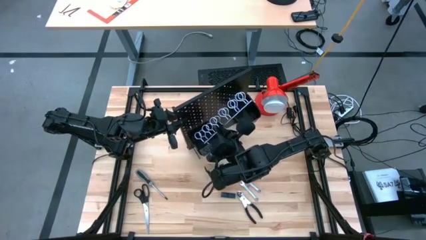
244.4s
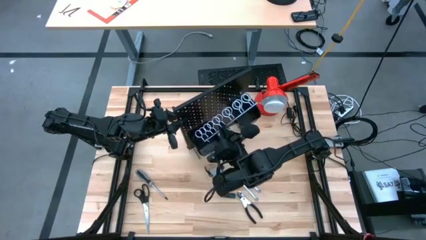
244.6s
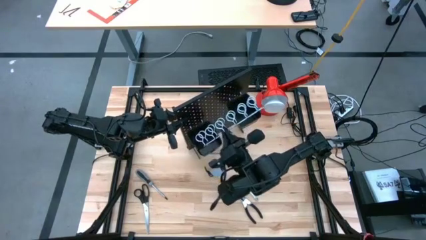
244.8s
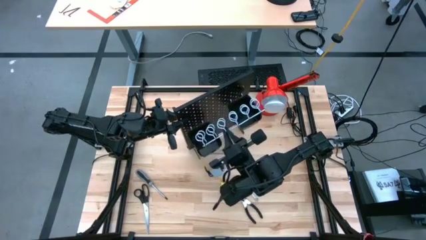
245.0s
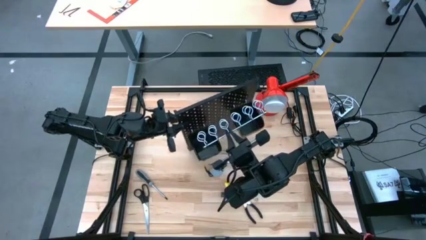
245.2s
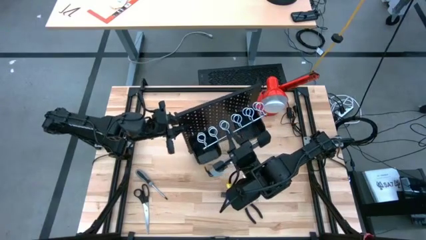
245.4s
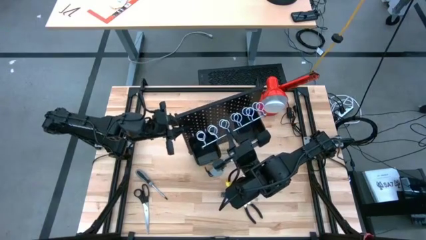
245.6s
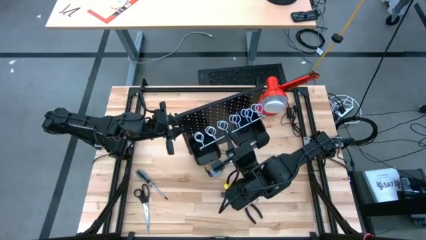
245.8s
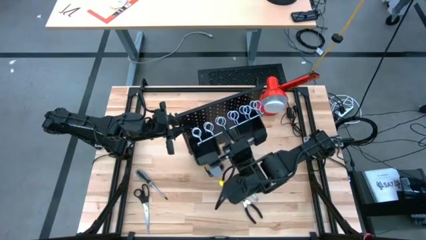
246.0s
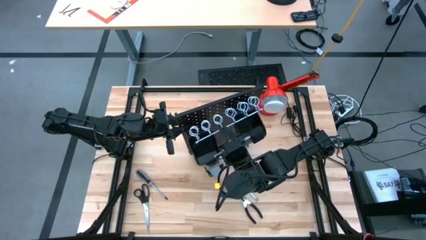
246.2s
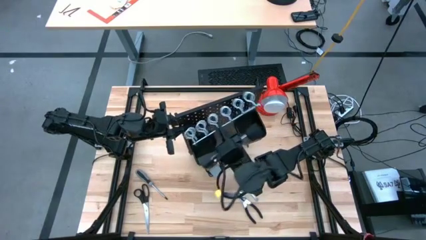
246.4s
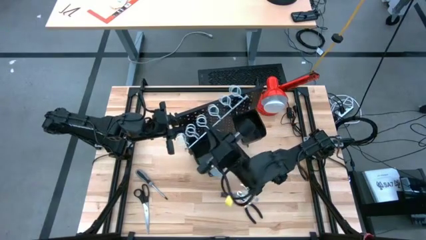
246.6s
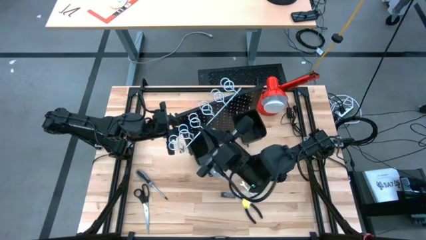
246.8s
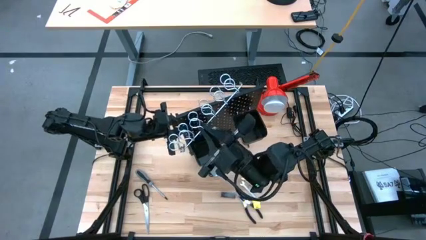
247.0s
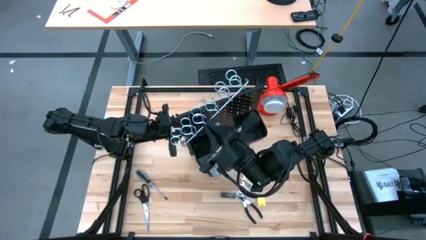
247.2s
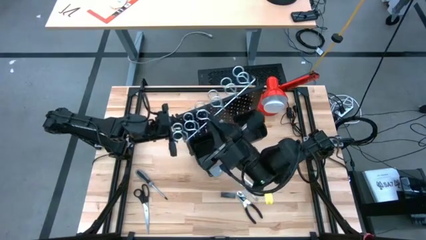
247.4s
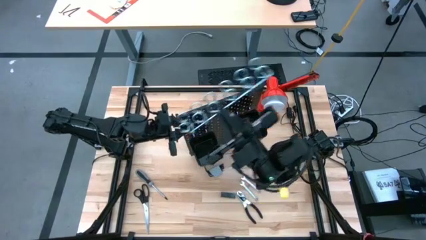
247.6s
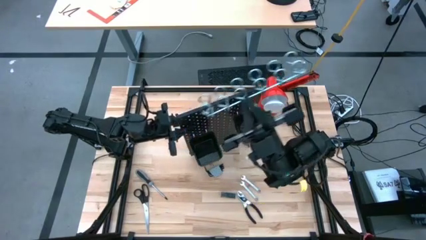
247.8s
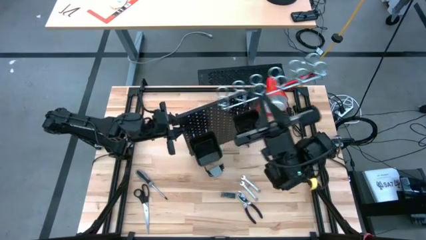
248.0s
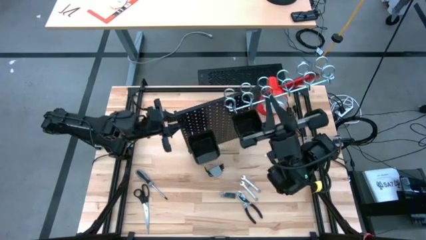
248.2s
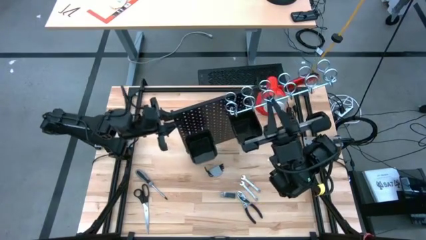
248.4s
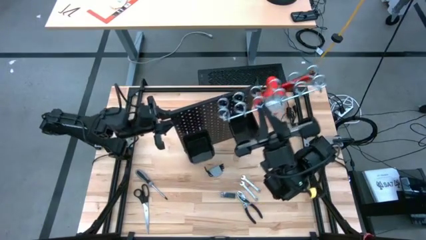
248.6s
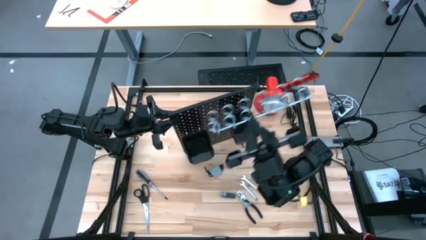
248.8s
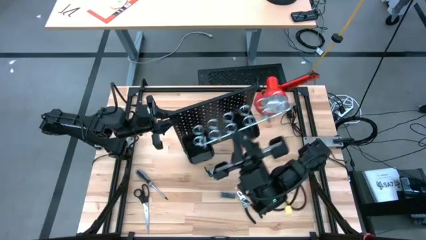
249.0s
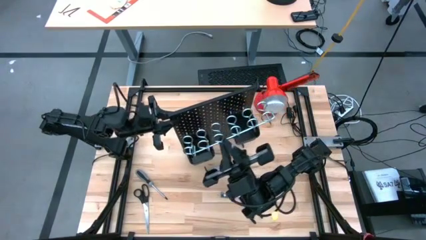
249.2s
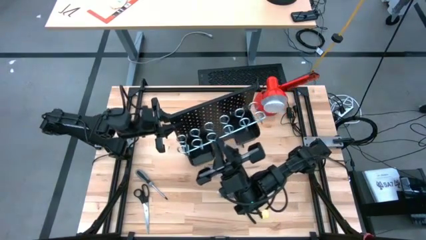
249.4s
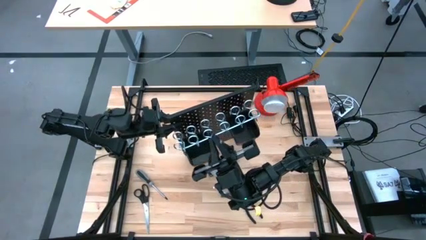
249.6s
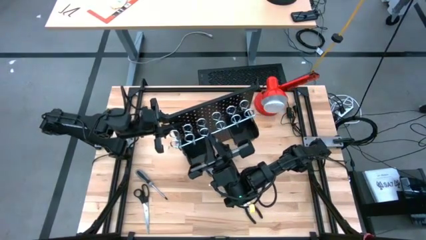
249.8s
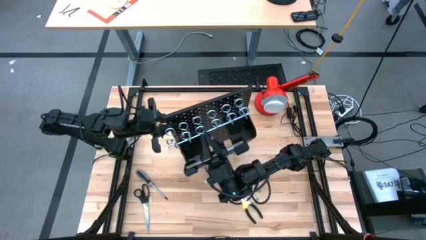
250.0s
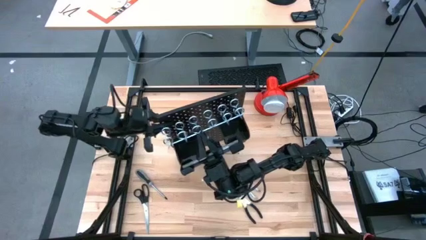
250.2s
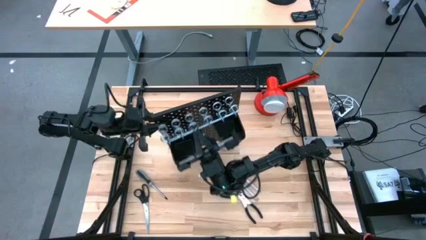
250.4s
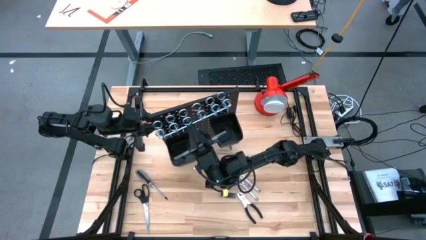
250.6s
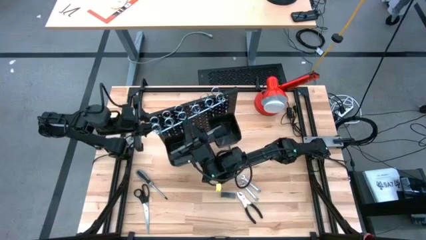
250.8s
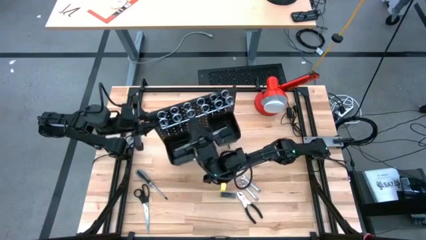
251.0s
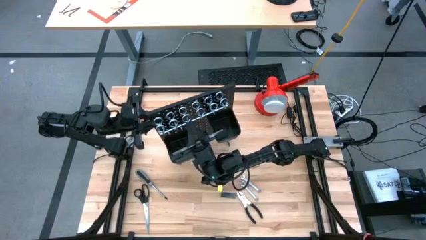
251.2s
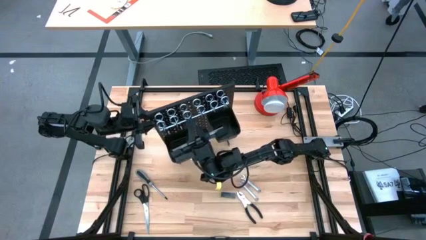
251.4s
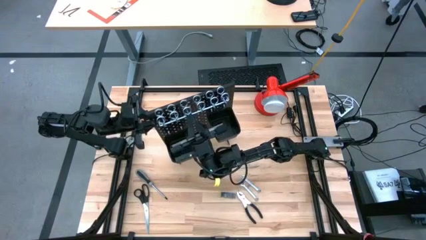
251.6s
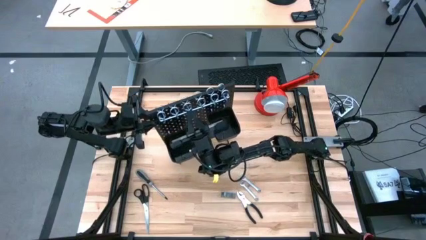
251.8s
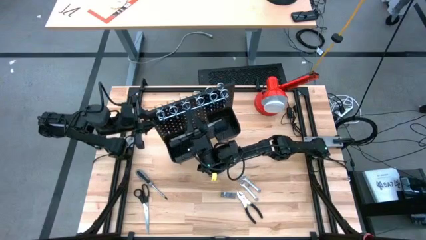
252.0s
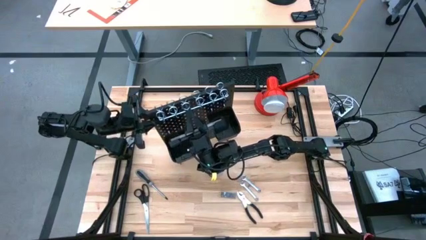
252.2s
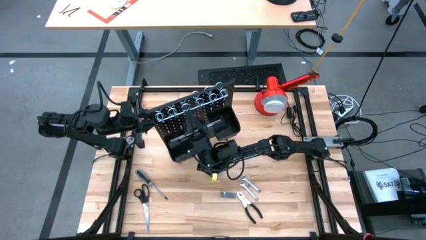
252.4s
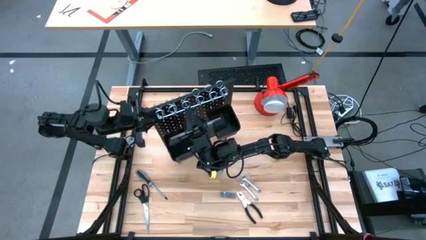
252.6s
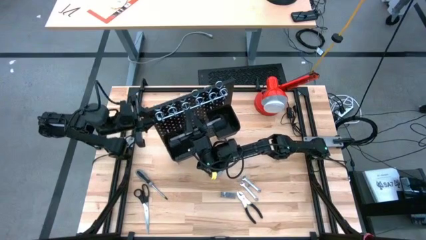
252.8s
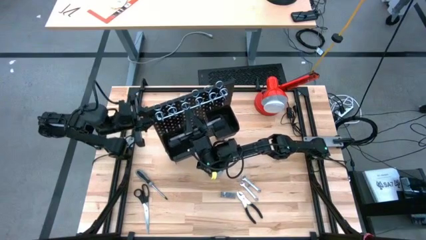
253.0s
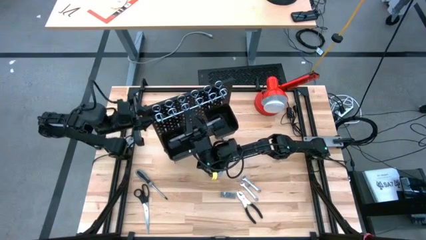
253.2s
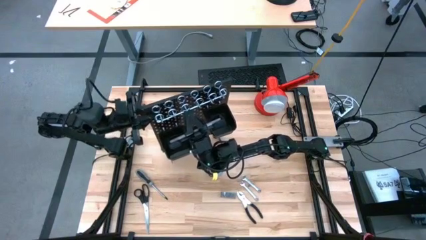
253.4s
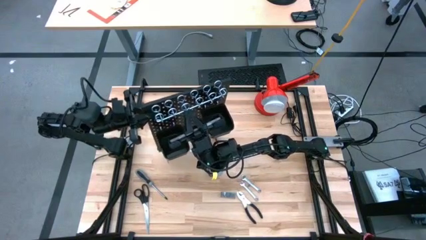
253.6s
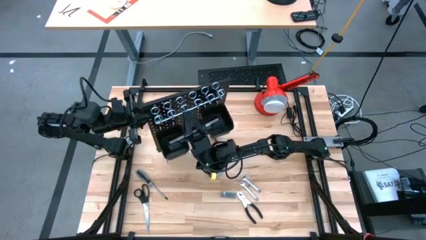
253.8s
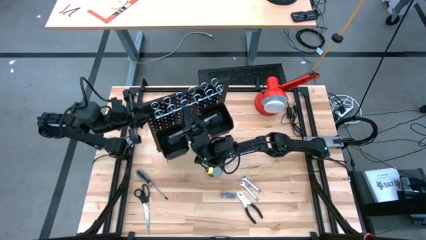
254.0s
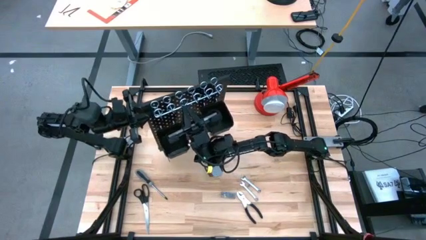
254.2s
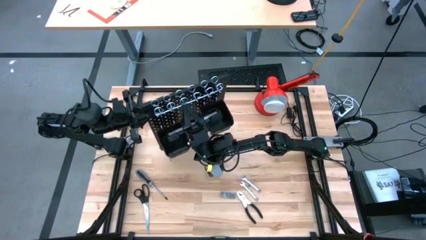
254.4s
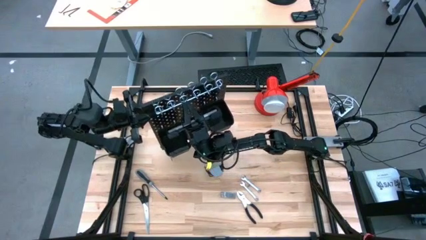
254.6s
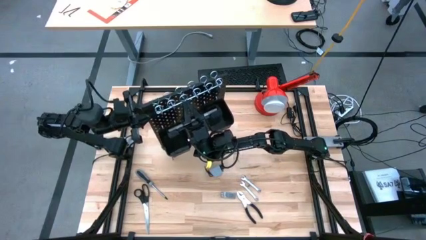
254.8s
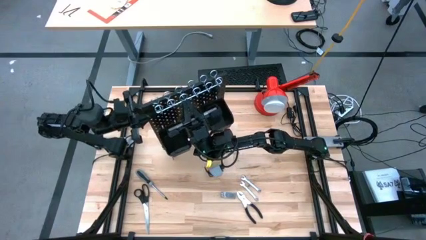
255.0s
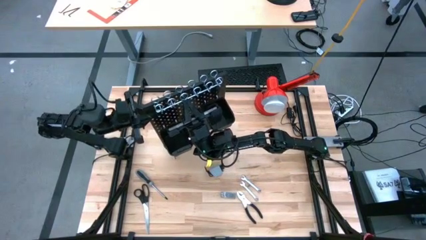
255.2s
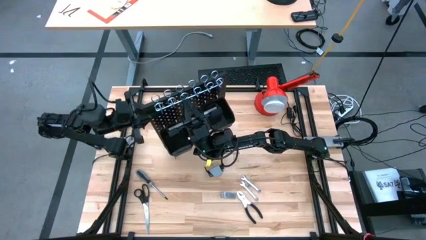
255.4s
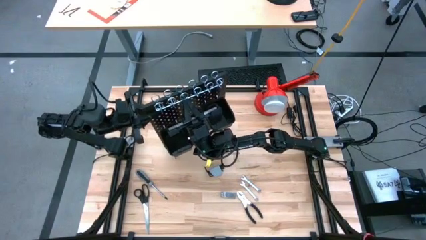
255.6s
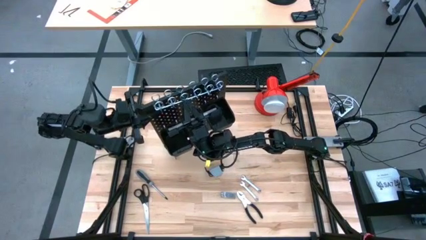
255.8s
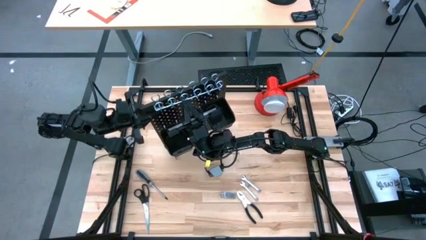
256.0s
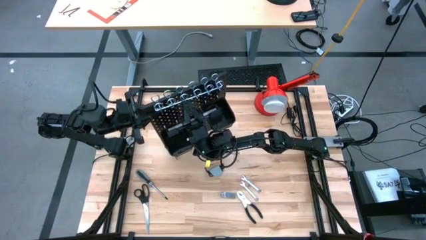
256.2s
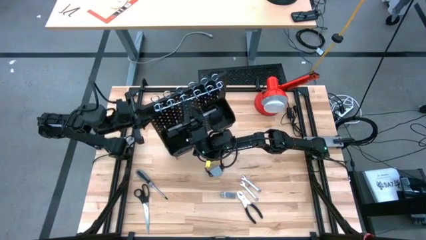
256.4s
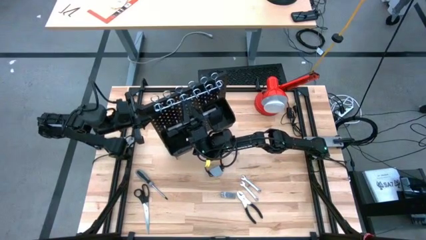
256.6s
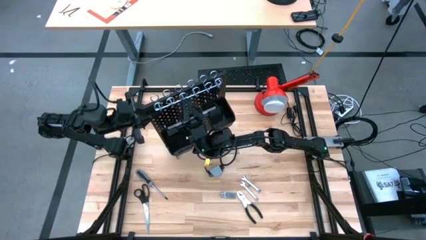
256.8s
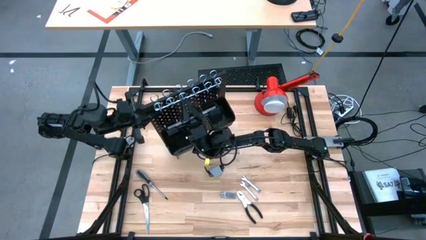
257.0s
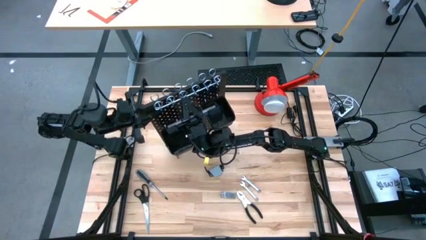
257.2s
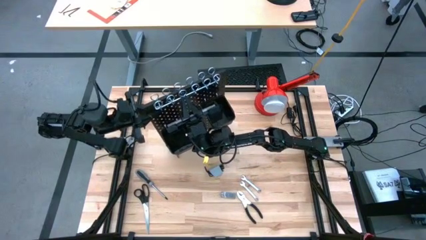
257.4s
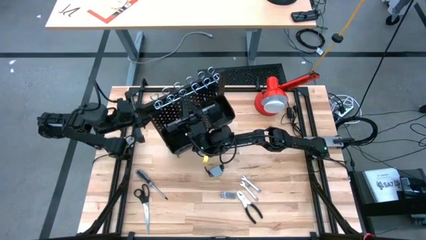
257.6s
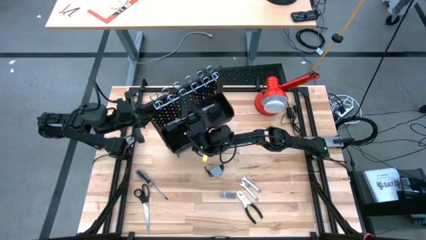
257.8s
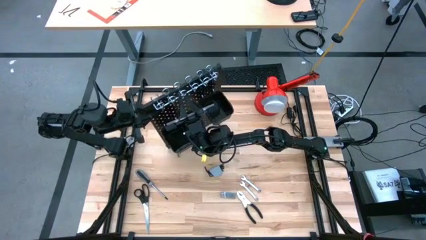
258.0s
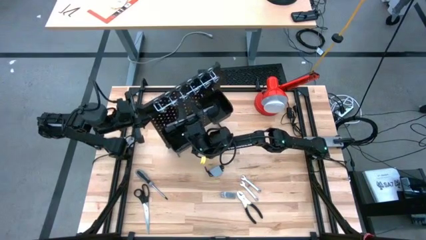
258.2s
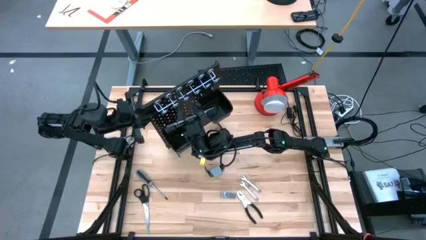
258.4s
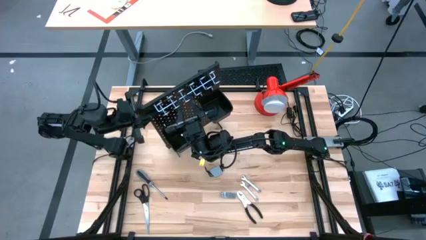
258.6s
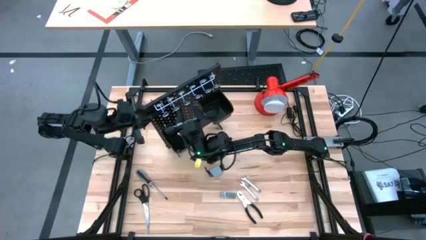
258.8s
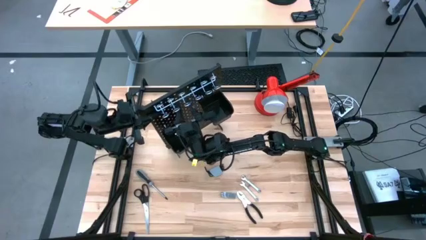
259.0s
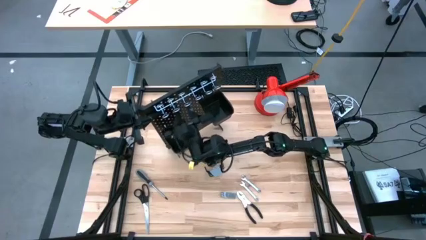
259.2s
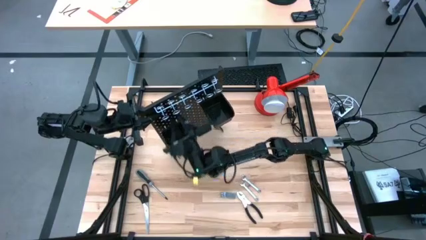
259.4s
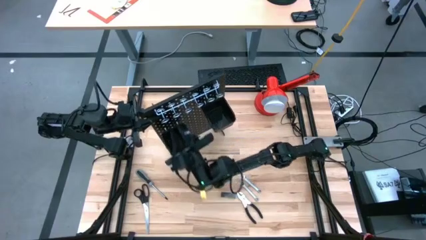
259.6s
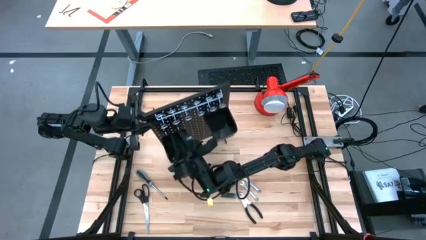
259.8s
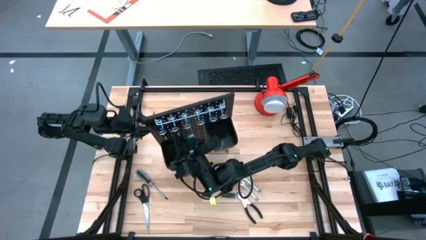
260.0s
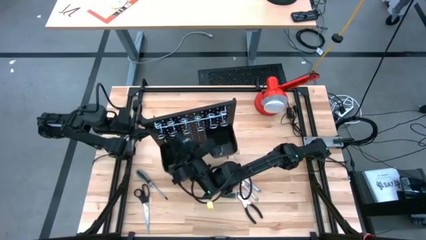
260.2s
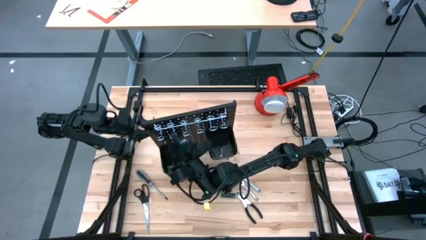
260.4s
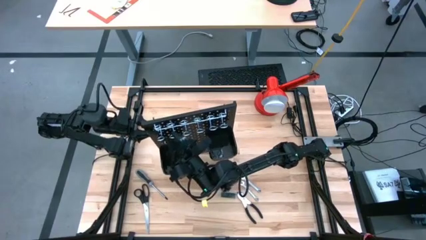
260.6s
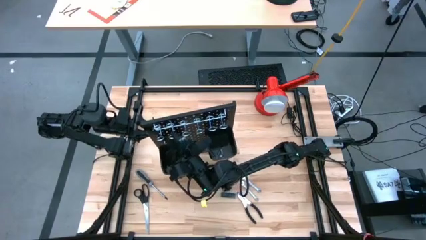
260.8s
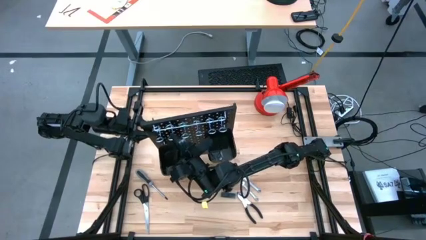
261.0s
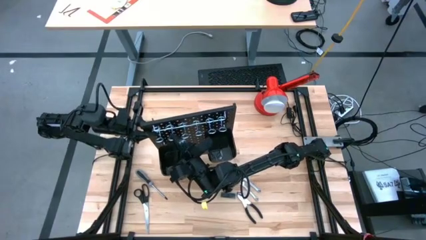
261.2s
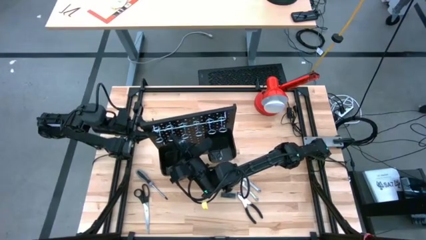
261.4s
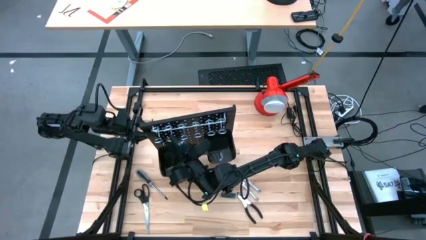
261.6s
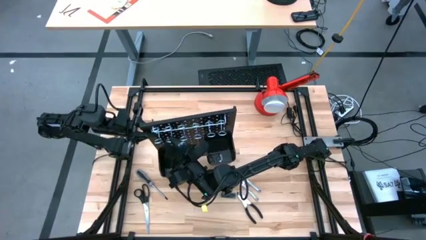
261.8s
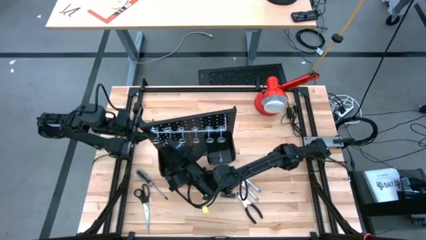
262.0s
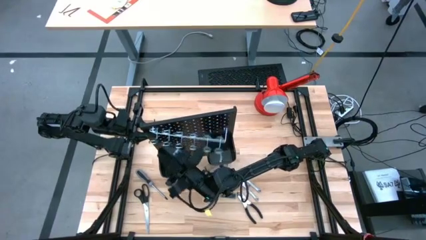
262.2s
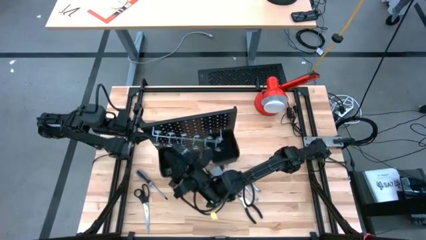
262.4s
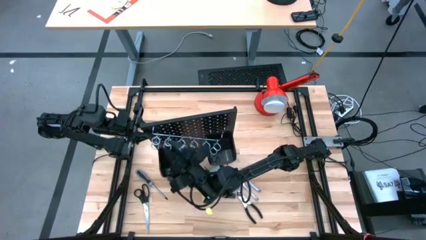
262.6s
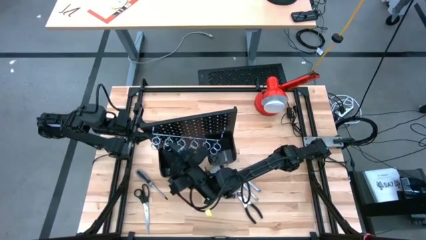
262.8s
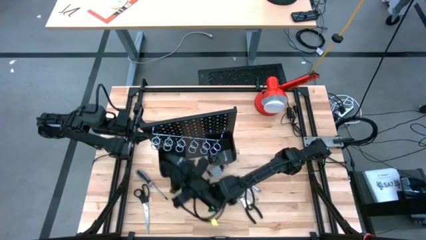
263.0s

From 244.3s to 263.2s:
Task: Hang tools onto peg board
Assemble the tool holder on the pegboard
